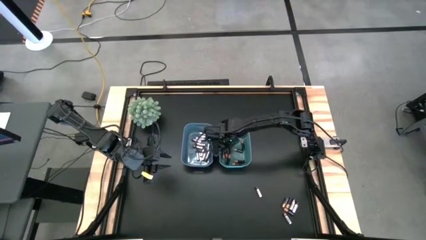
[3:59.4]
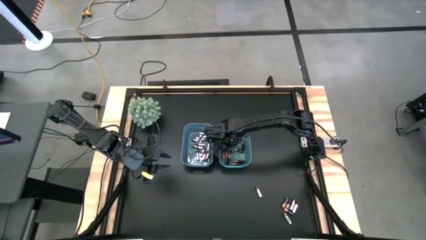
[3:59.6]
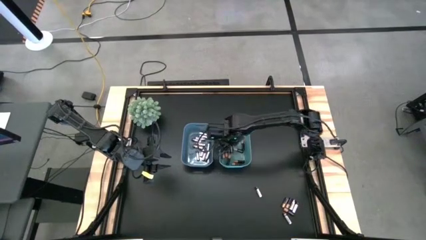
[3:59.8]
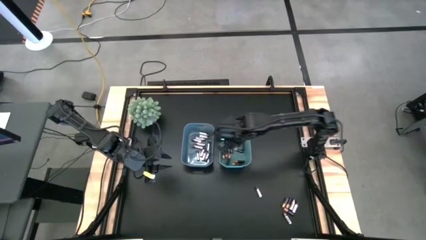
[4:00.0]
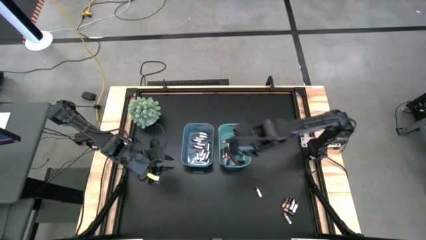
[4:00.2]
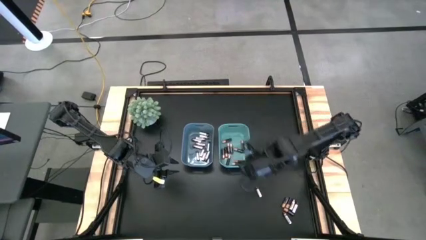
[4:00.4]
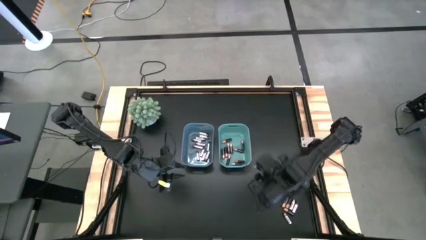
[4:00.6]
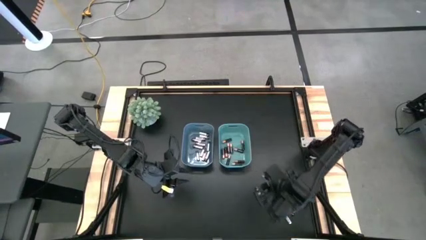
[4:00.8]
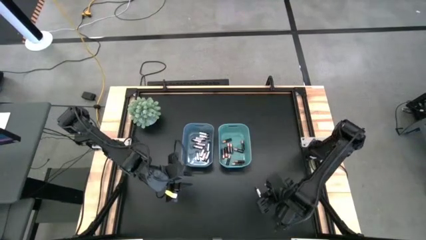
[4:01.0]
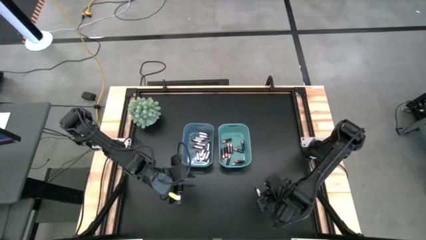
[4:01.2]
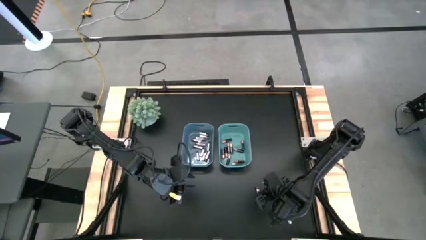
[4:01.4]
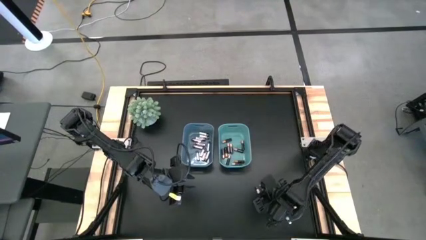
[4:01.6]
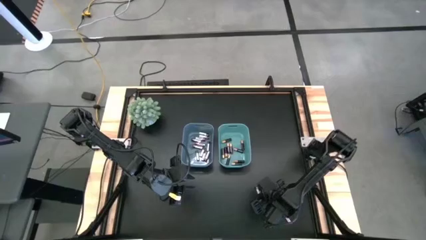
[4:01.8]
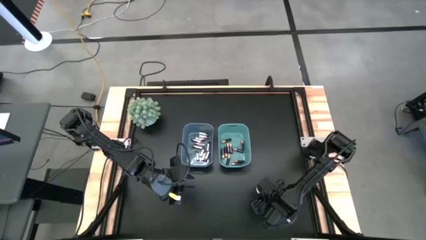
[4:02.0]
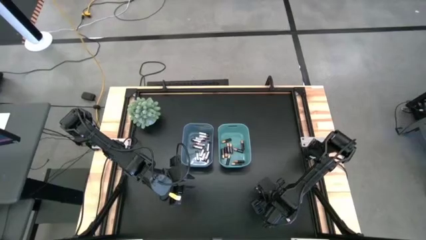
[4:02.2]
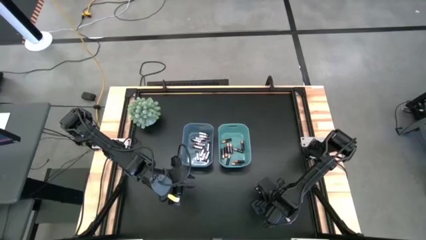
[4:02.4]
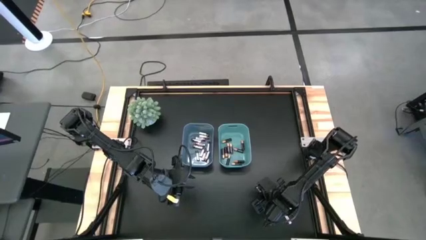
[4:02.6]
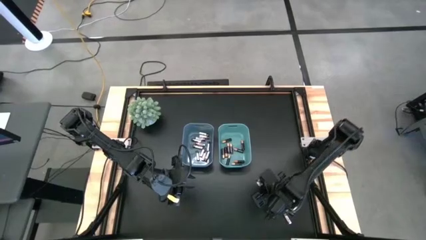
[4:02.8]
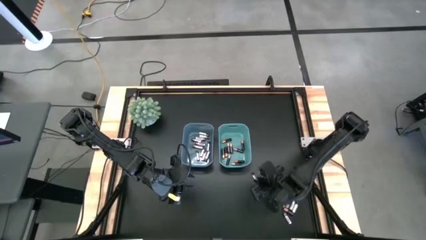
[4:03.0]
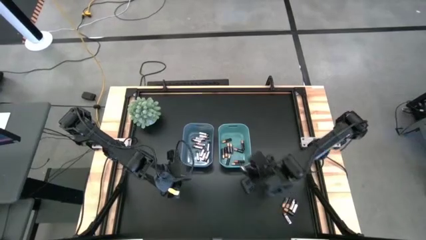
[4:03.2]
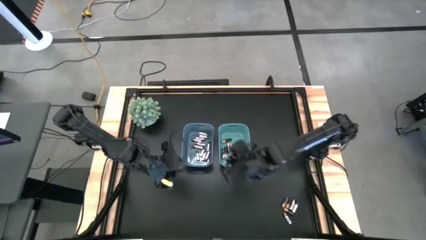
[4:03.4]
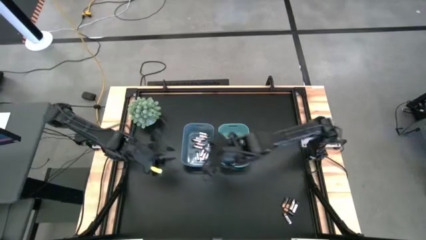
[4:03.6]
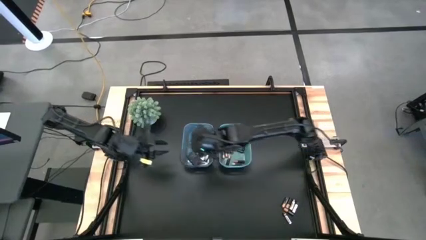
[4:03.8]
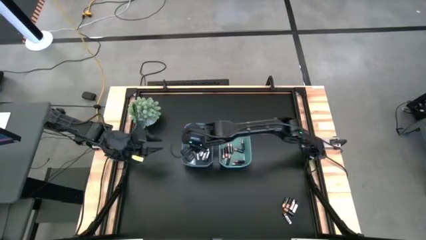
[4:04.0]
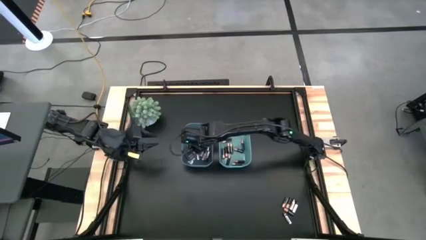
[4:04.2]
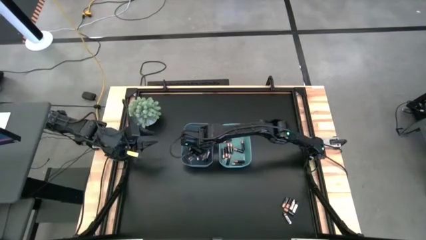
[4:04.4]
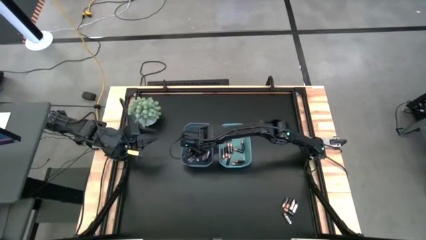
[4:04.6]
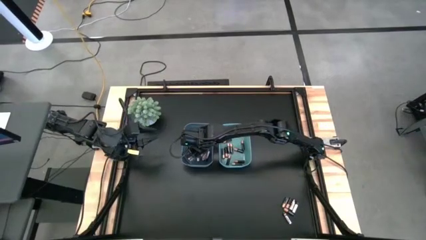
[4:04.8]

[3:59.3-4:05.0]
Task: Sort batteries
Put the silver battery into the blue bin

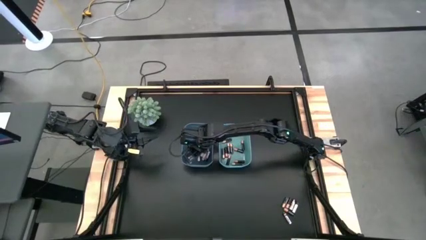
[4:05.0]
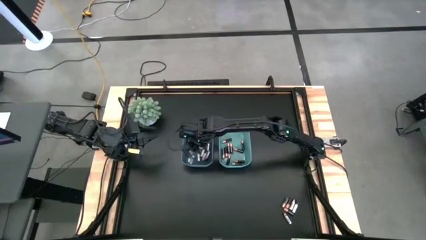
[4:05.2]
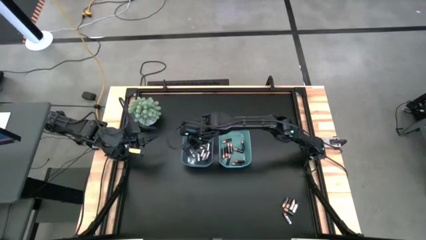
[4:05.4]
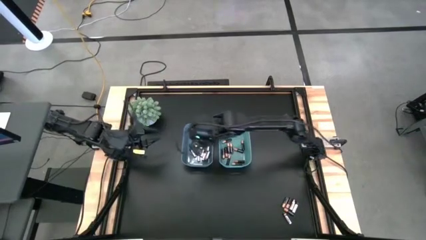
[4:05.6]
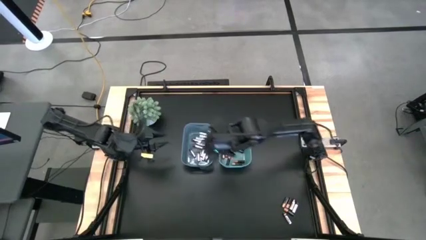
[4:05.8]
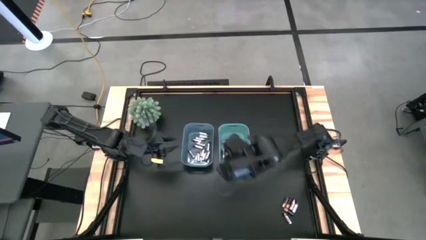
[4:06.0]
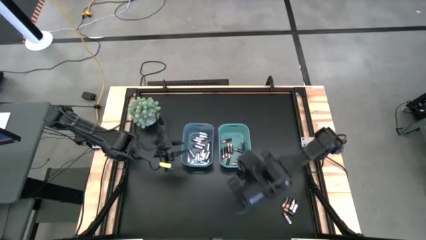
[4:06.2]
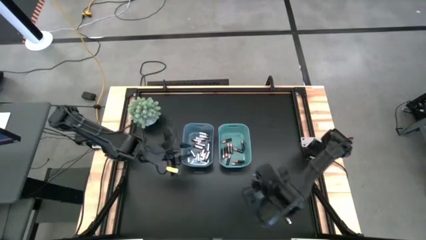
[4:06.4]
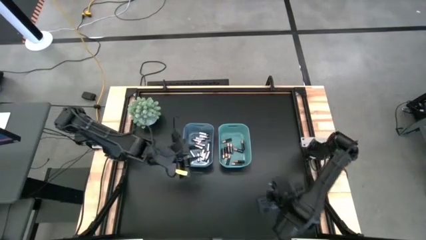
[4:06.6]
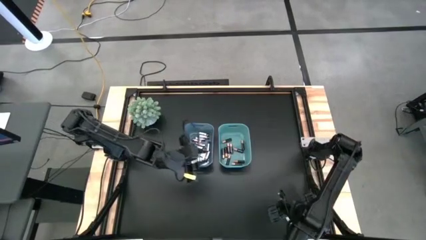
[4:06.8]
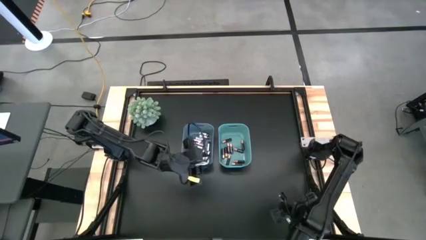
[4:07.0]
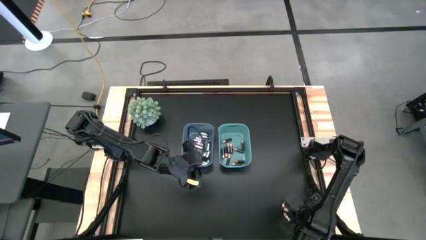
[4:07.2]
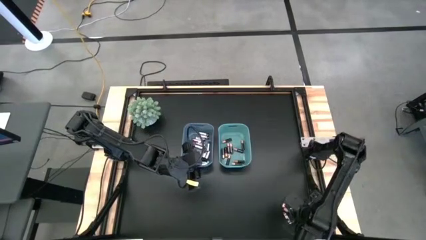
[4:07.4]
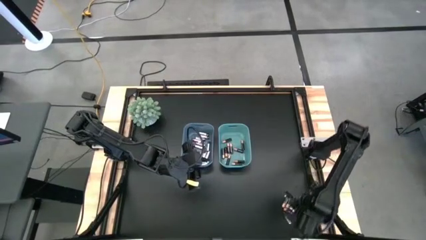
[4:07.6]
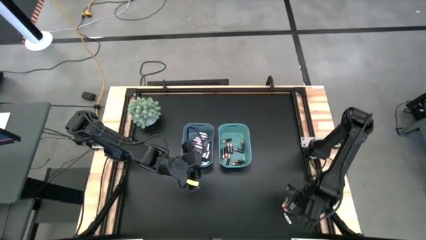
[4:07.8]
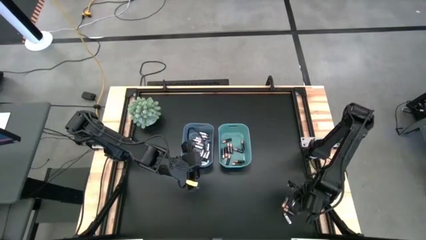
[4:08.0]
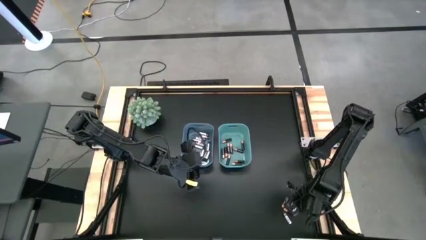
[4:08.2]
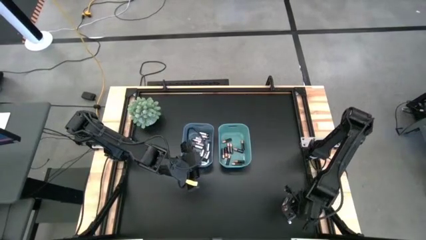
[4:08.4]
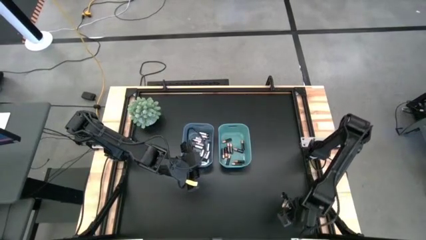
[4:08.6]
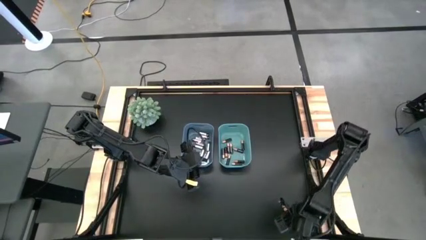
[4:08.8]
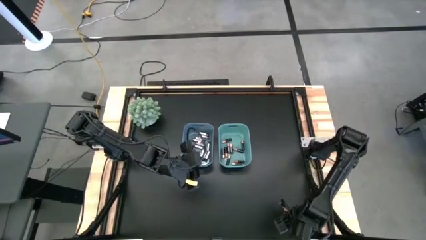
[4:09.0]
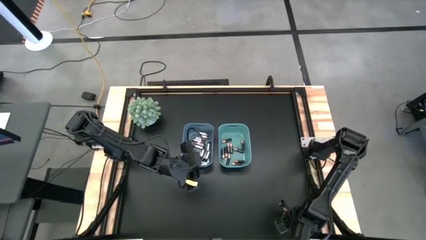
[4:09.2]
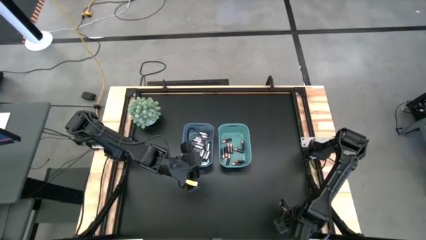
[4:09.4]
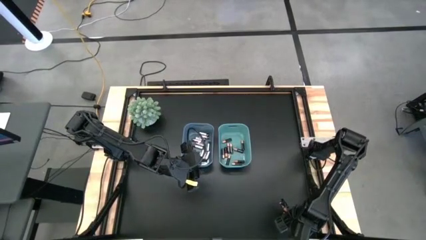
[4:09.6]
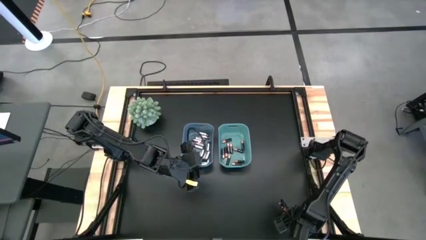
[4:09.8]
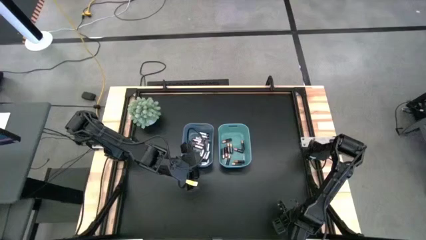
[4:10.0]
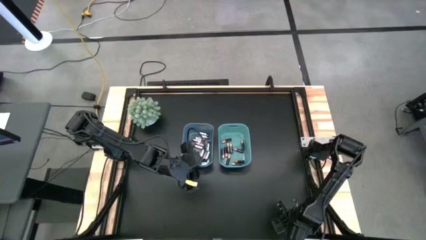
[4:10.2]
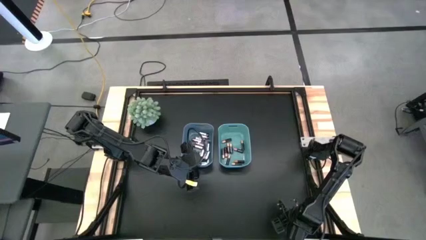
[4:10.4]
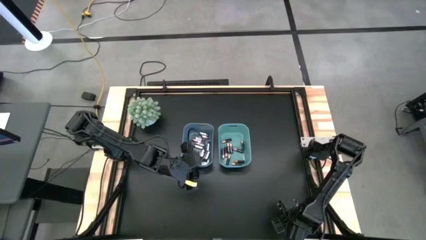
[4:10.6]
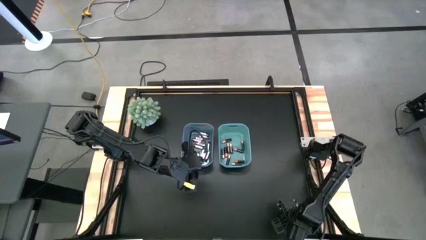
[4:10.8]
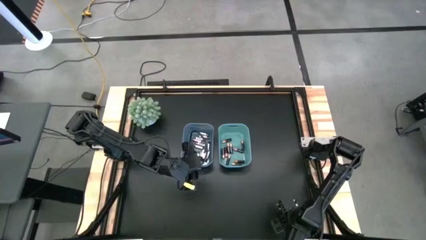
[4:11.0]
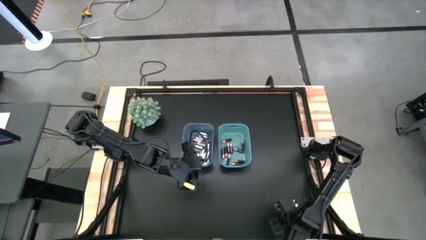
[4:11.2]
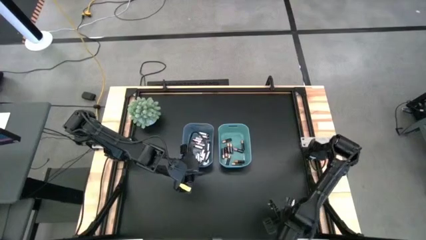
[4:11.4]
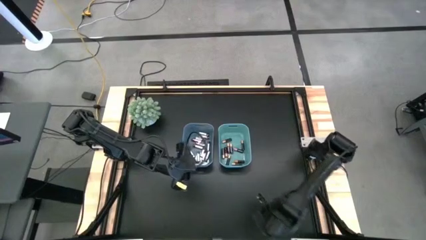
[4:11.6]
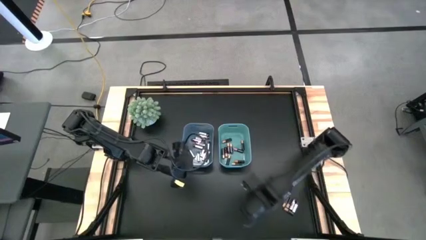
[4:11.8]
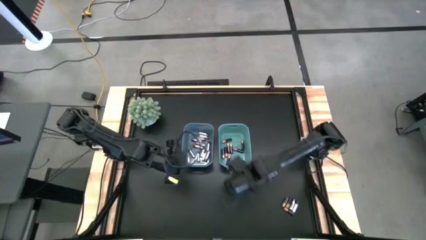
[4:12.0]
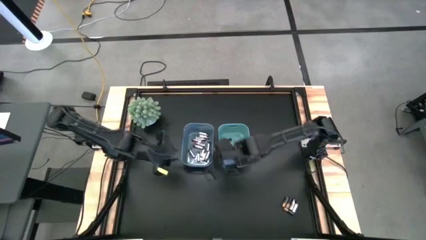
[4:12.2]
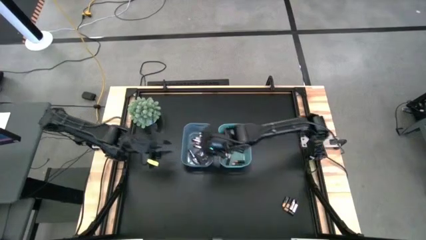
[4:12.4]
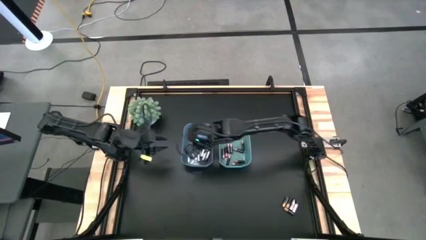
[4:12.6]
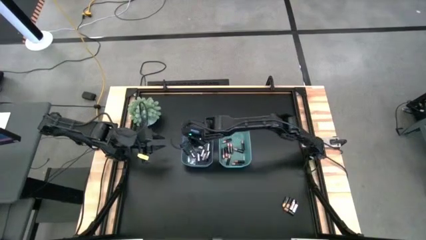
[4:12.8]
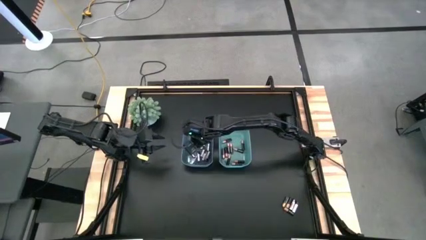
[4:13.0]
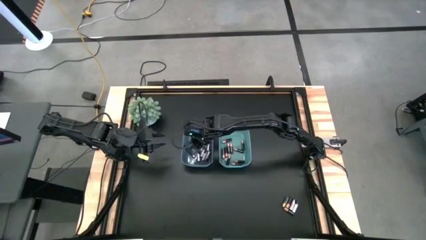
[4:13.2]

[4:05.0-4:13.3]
Put the silver battery into the blue bin

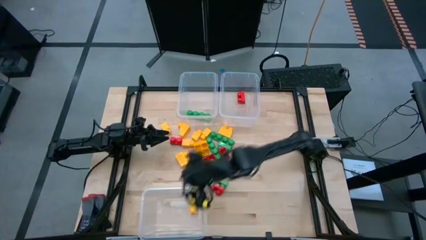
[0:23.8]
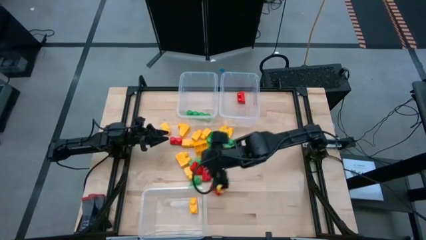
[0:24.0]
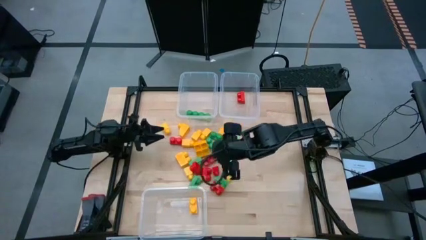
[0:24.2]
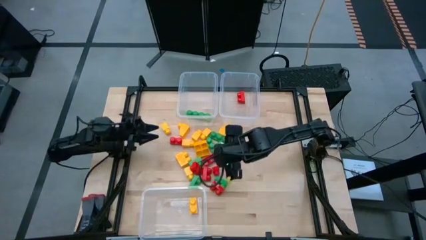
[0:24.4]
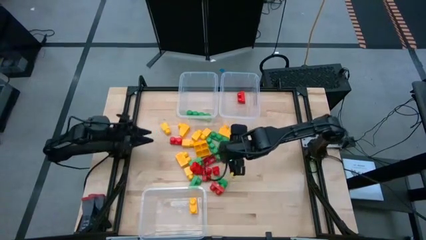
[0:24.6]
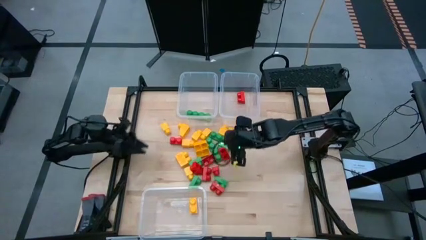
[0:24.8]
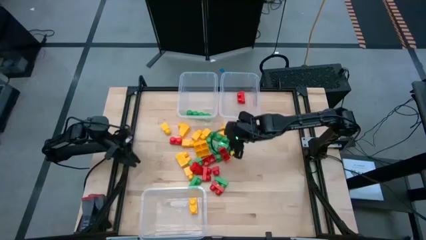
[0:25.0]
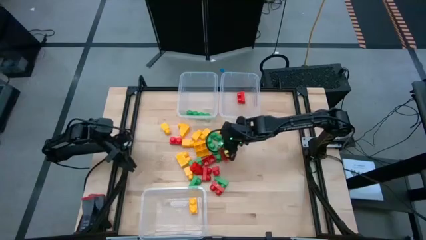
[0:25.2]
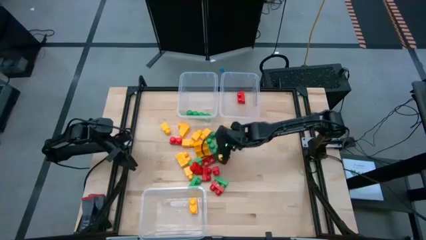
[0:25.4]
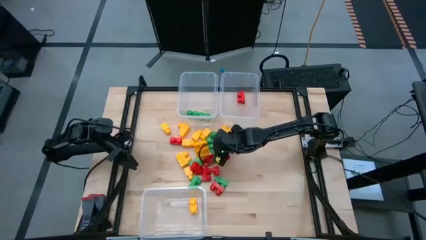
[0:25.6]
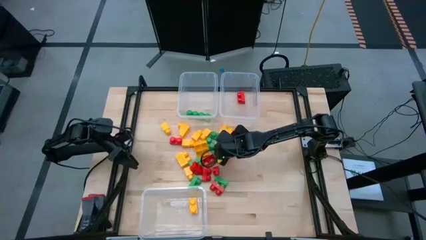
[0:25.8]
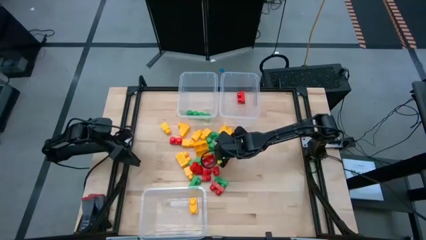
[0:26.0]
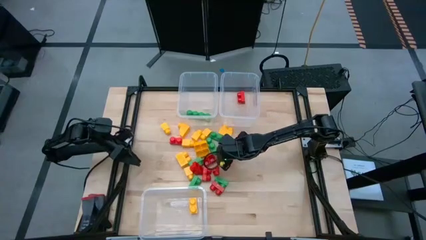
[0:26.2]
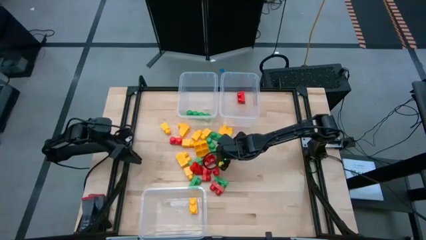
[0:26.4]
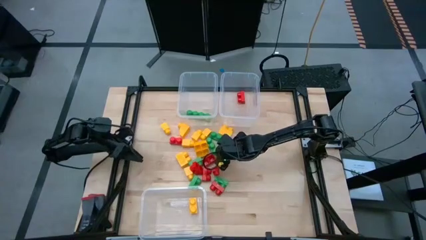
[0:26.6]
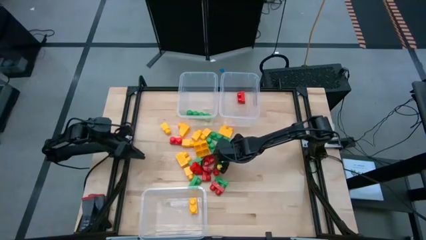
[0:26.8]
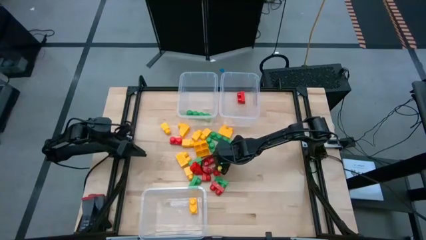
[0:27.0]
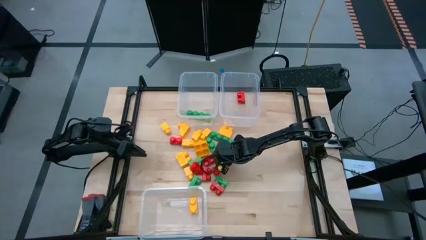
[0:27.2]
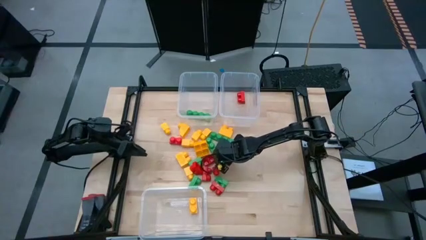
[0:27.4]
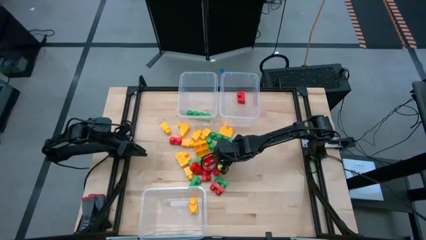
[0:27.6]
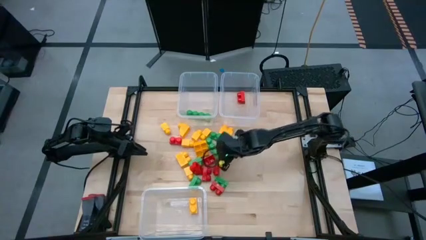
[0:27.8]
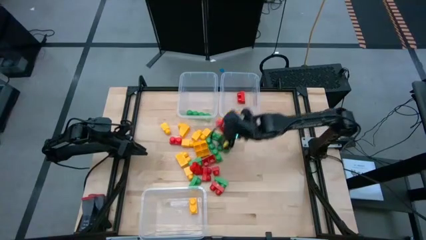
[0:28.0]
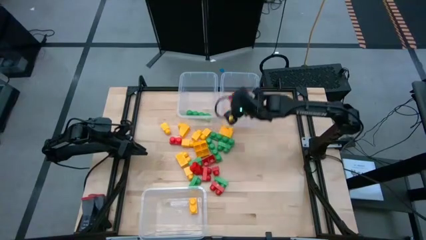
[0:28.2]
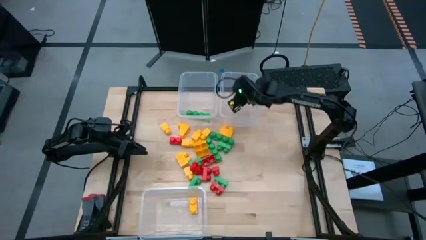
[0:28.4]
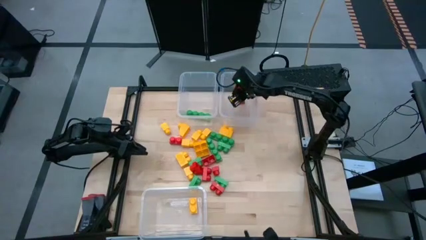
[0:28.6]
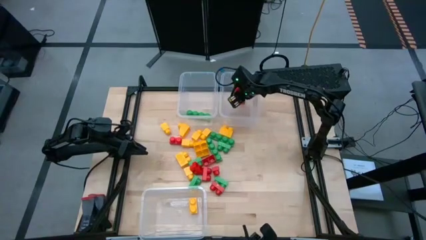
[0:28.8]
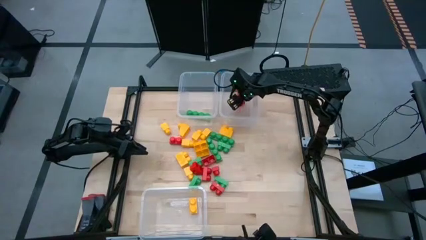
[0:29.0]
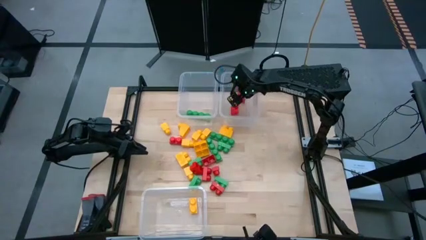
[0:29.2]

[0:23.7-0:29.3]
Task: Sort blocks
Put the red game piece into the top right transparent bin
